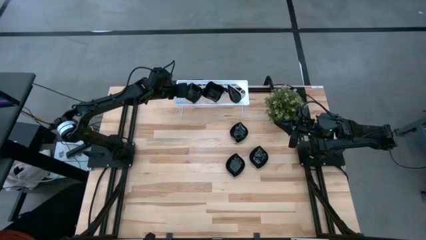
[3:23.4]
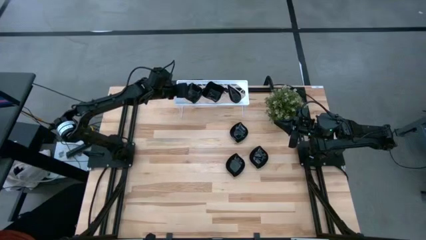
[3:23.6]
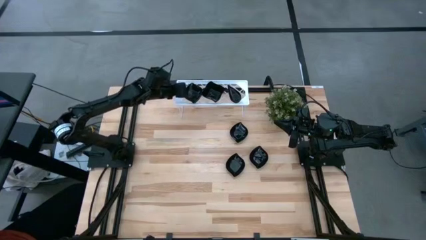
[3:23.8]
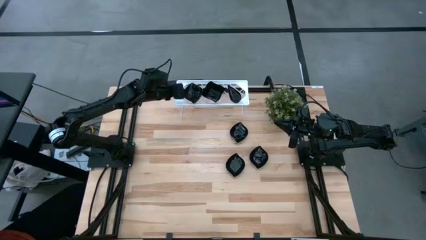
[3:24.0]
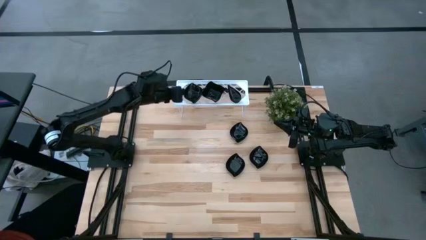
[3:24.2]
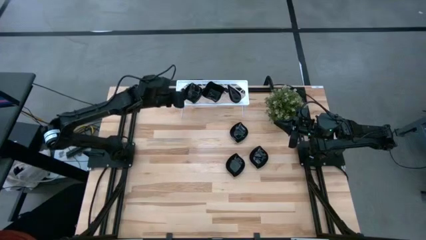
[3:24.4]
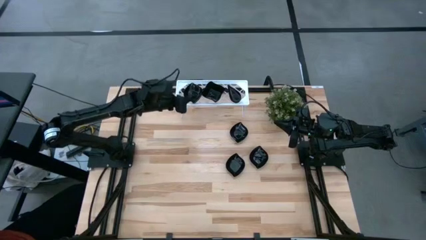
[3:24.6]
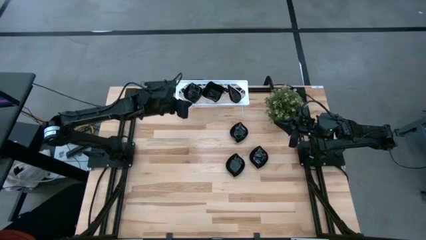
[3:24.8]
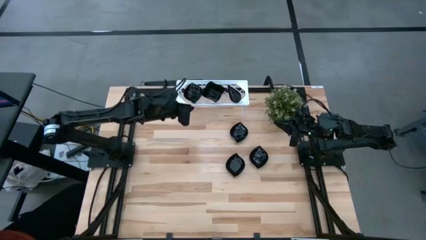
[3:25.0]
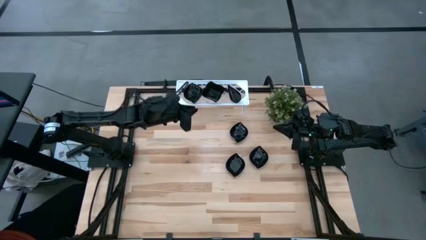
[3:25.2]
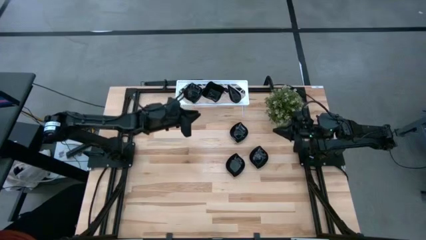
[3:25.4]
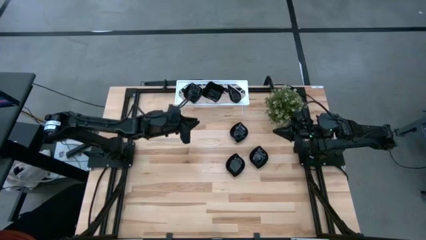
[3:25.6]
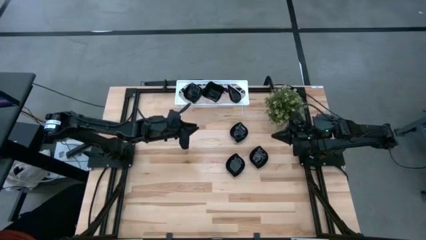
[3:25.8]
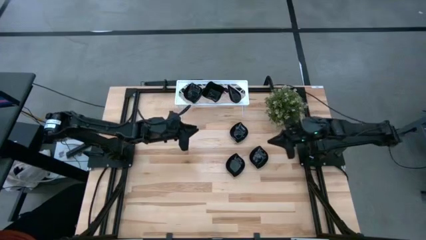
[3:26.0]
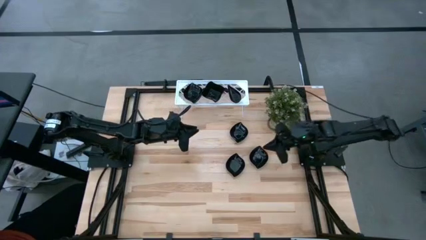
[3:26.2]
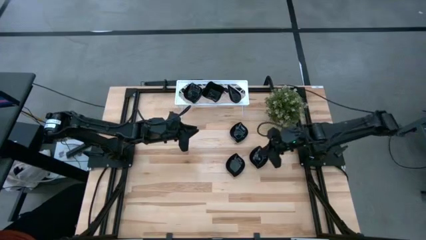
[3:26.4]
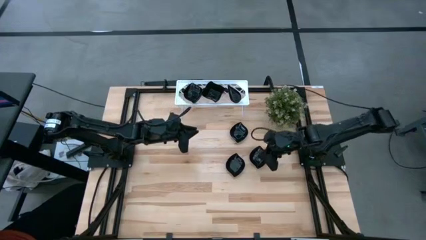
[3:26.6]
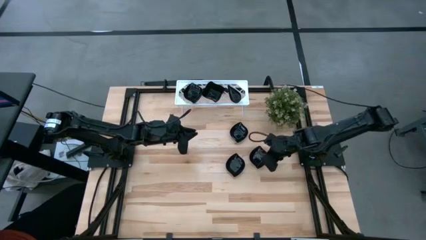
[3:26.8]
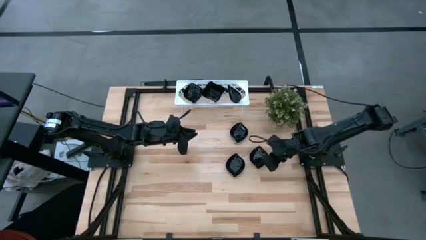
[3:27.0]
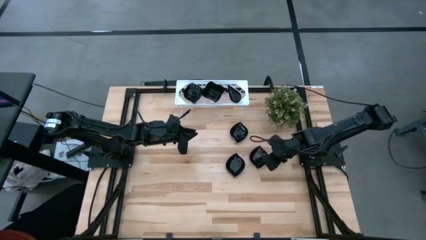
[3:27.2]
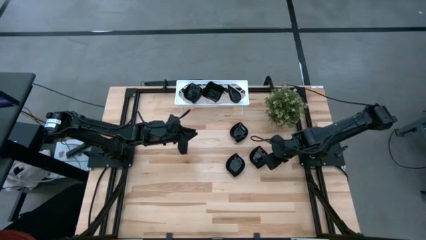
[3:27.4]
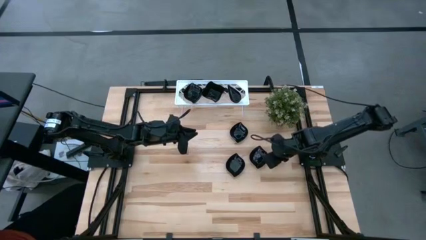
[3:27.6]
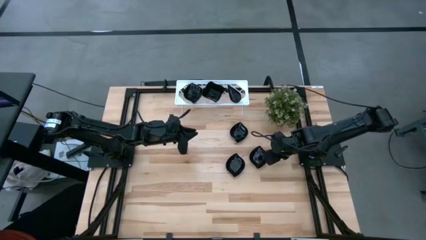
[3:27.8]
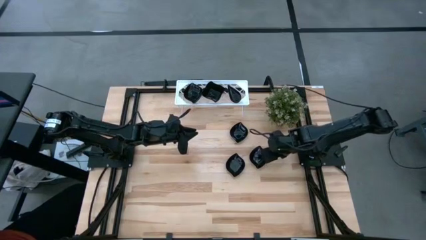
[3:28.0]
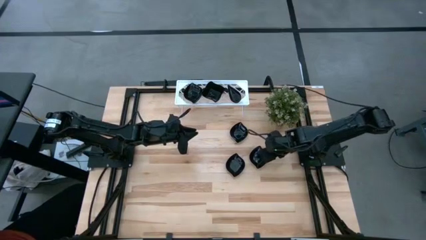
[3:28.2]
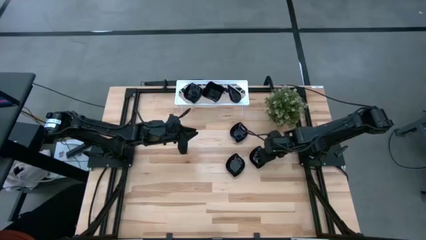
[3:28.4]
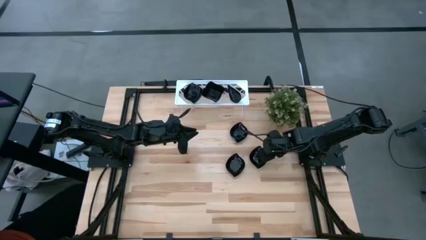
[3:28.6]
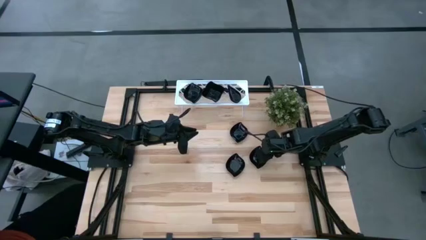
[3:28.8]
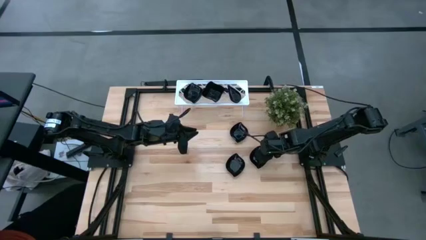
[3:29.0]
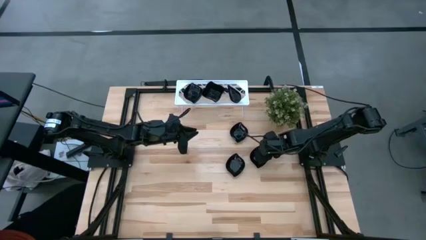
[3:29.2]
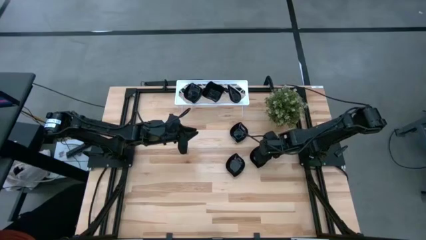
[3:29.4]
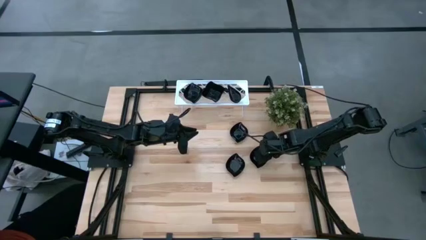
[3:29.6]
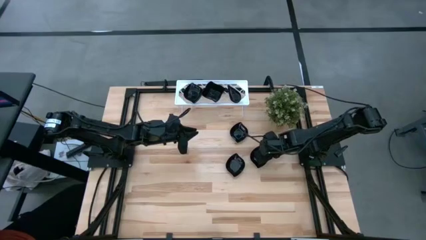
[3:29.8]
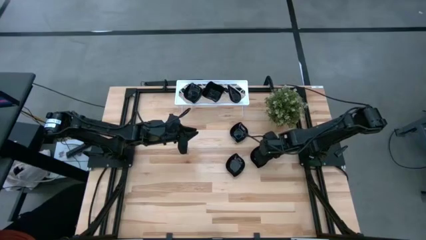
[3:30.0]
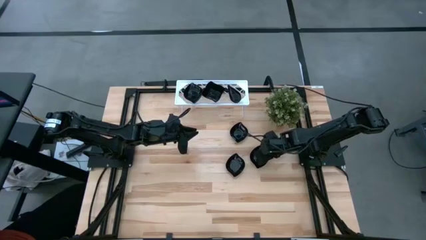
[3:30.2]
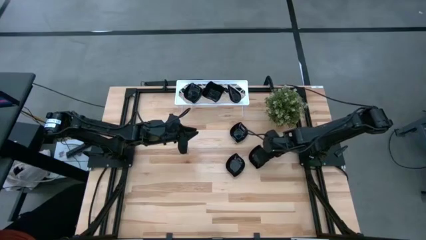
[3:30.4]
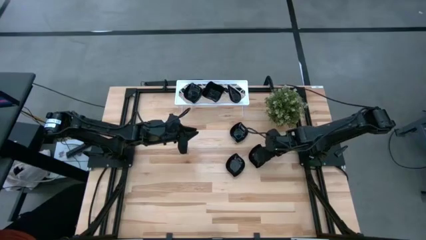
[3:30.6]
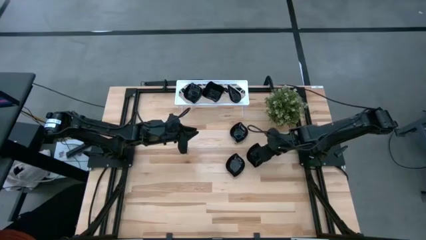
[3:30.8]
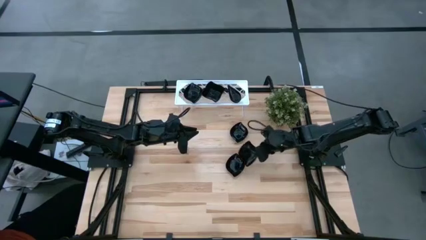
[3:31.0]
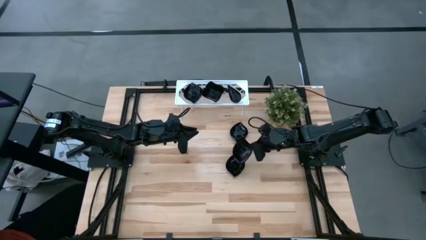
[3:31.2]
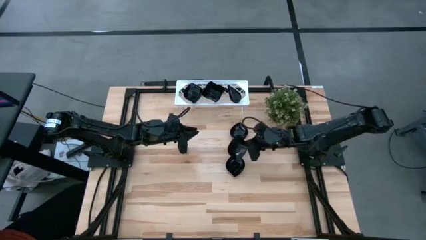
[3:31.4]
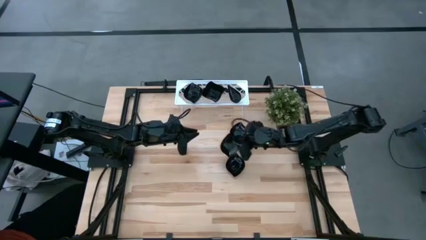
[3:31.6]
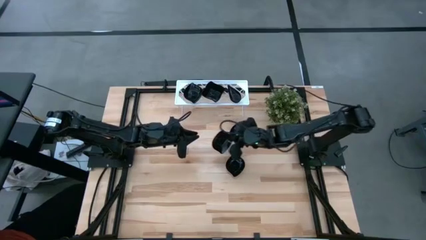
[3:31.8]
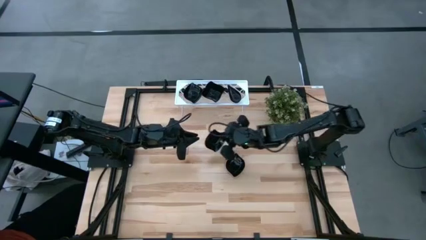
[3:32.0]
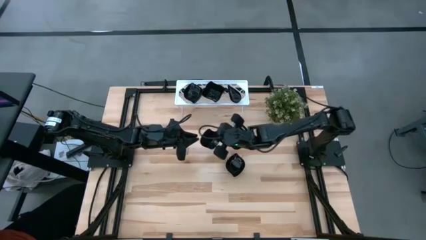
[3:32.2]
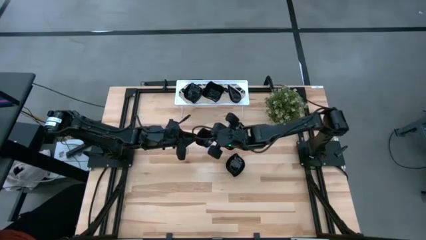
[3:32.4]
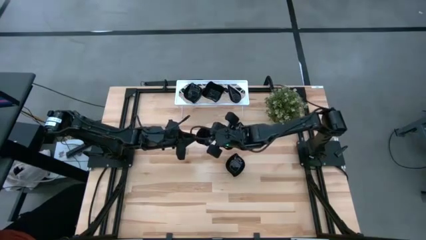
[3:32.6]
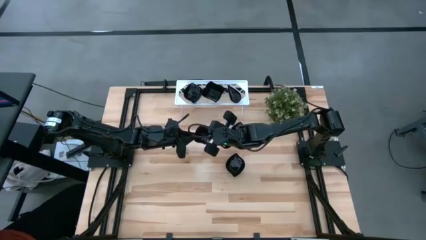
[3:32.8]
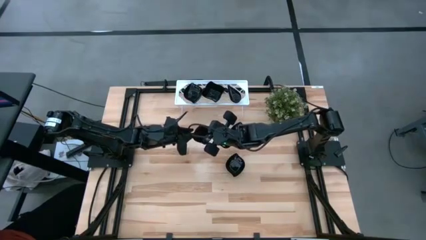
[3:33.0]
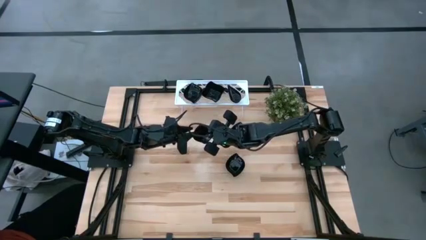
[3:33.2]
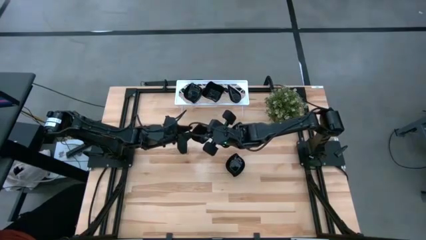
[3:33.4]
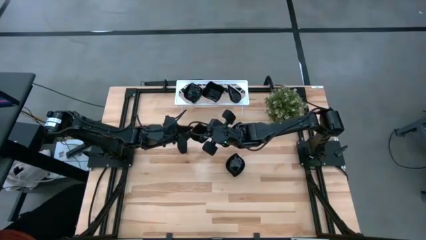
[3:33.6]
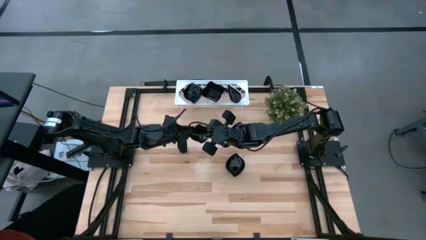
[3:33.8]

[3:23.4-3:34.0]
Task: Pick & Place Mini shaped plates
Stack the leaf-shaped plate on top of the other leaf-shaped plates on the shelf

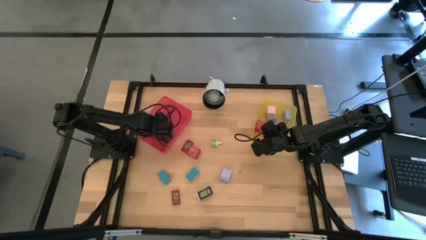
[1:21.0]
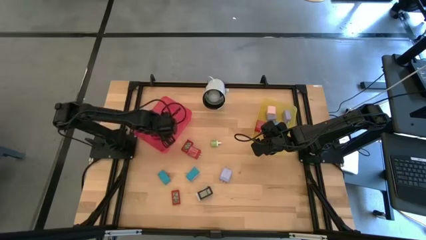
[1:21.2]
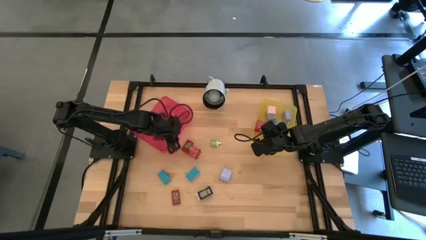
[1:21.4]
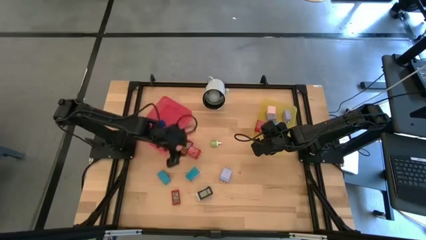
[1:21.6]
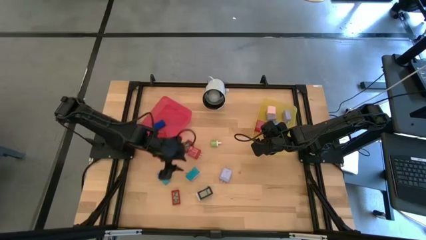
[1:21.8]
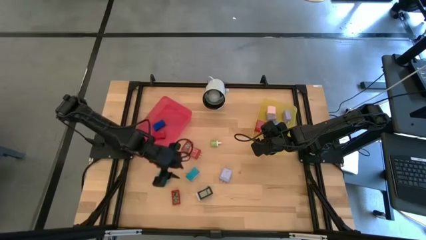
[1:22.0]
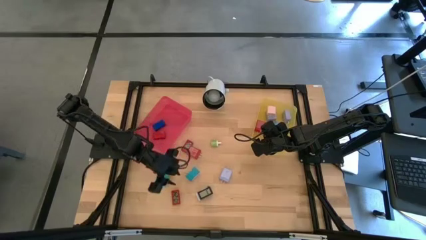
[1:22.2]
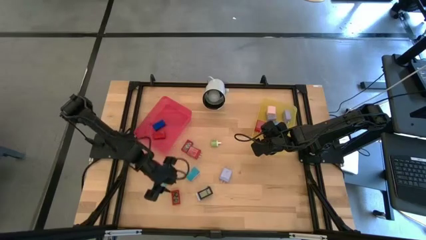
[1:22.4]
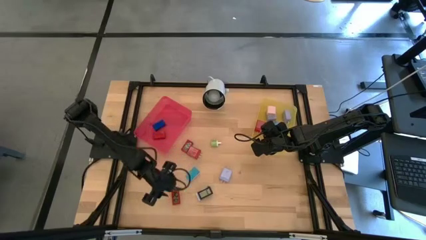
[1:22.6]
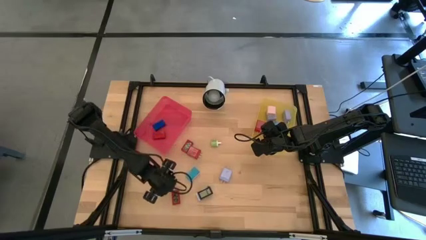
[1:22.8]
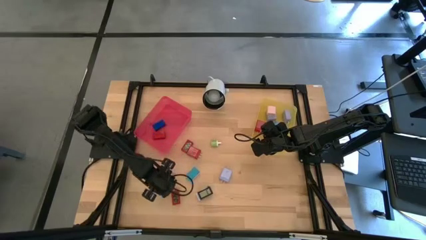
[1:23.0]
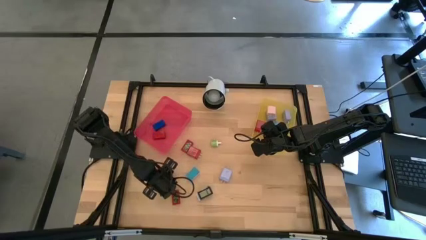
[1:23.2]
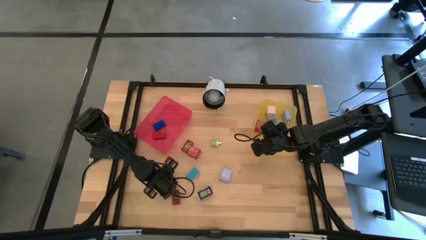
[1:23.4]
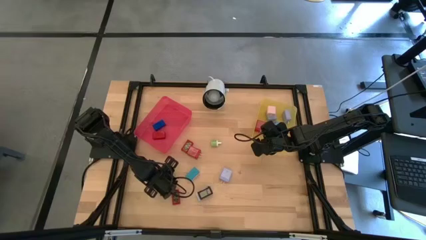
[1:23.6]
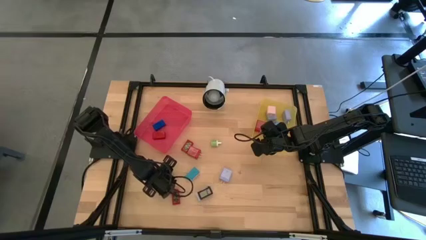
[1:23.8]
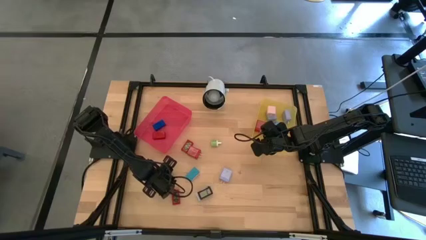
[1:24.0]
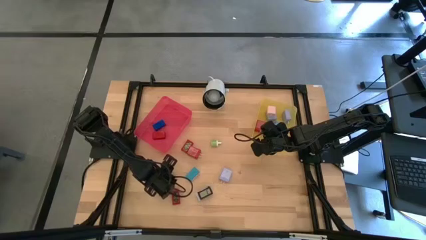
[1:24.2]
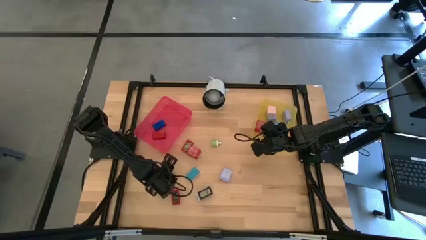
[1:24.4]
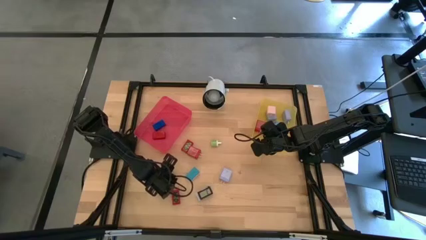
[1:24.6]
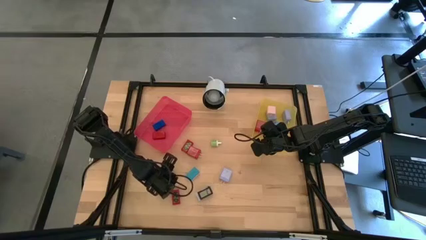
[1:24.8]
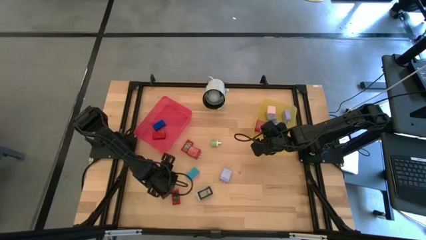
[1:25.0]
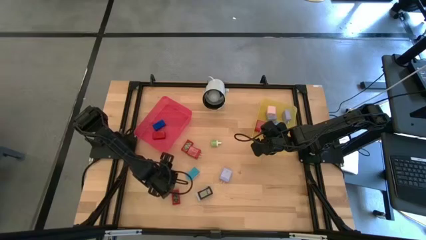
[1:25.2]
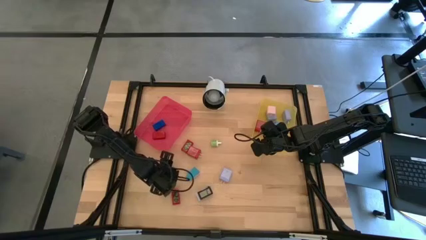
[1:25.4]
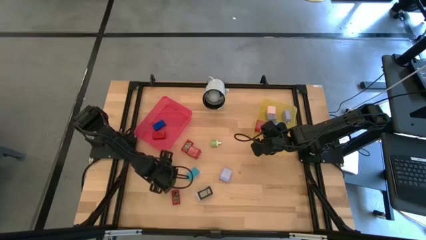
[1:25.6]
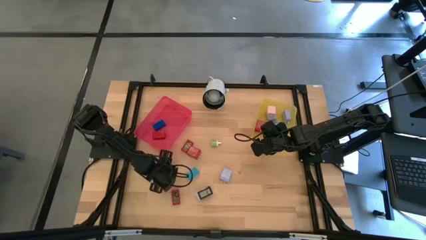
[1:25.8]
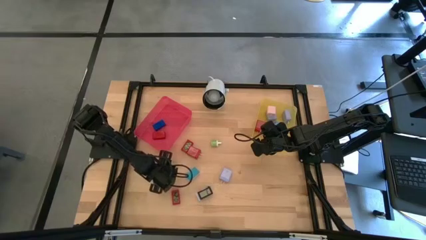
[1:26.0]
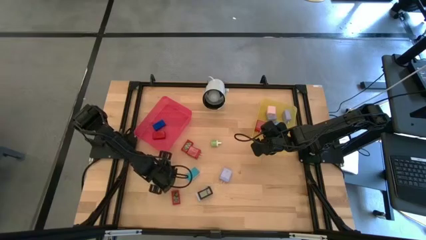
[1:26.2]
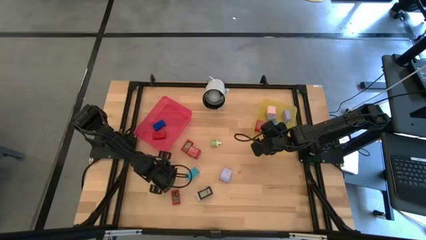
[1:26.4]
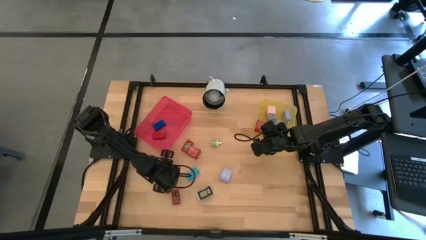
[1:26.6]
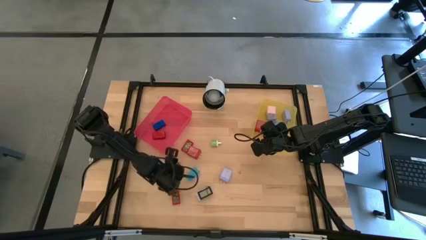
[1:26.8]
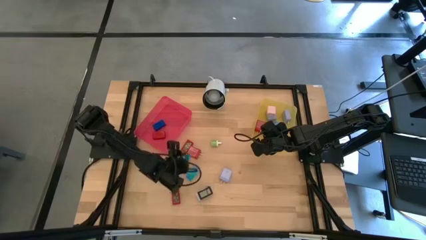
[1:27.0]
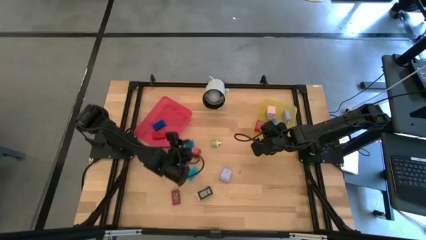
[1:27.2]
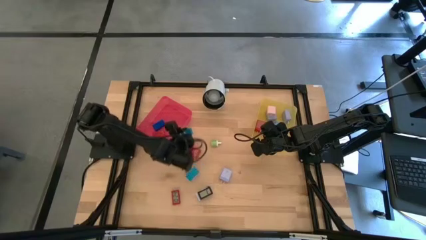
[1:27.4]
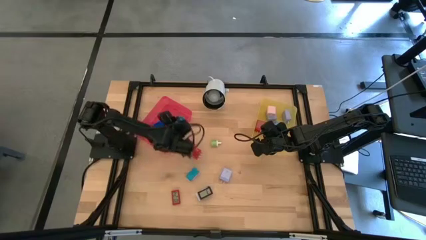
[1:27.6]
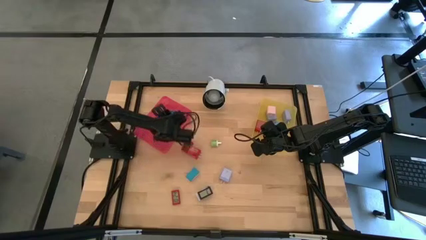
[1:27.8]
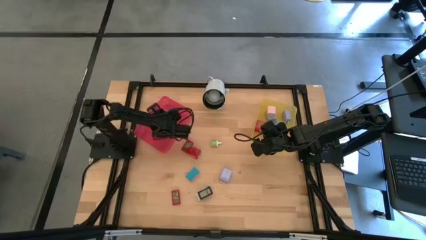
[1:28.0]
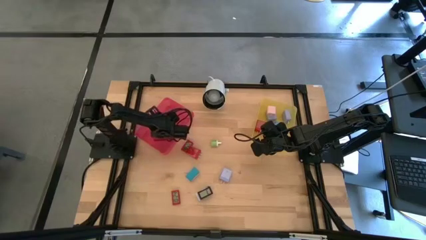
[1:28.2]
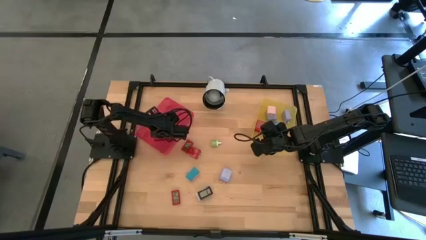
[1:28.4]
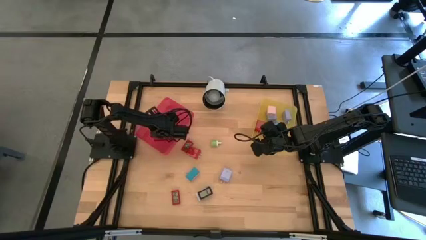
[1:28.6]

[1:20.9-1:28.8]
Task: Pick & Place Office items
Put the left light blue digital timer into the pink bin
